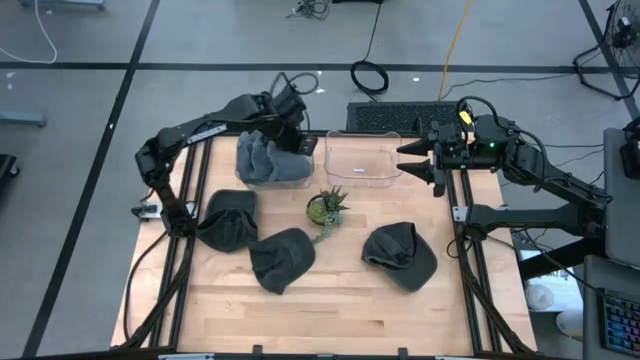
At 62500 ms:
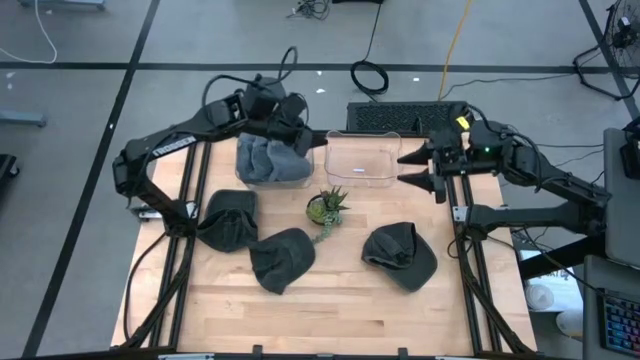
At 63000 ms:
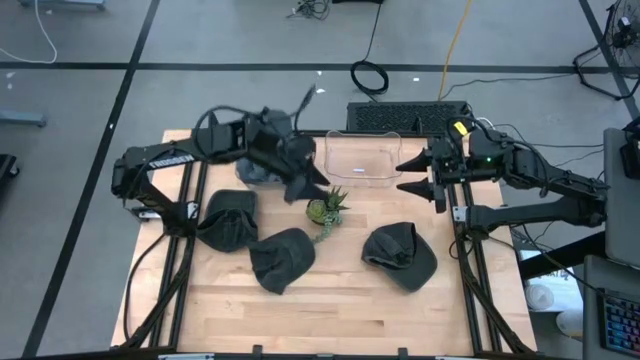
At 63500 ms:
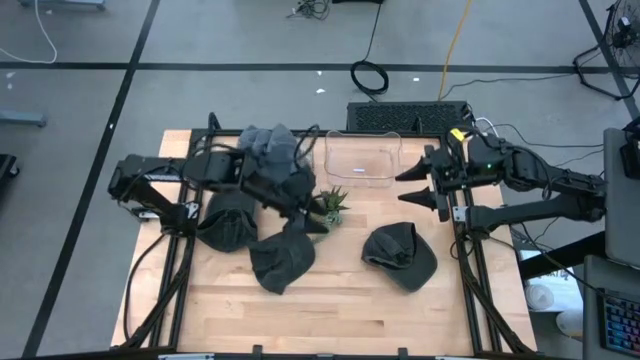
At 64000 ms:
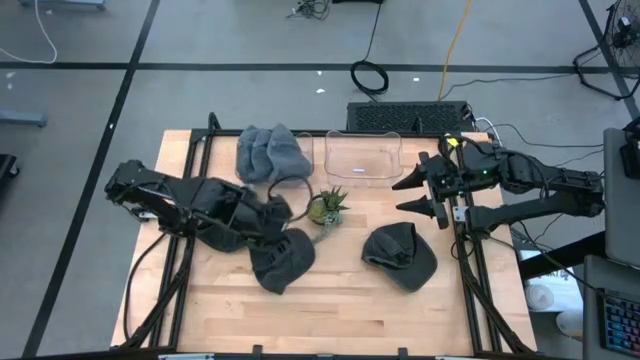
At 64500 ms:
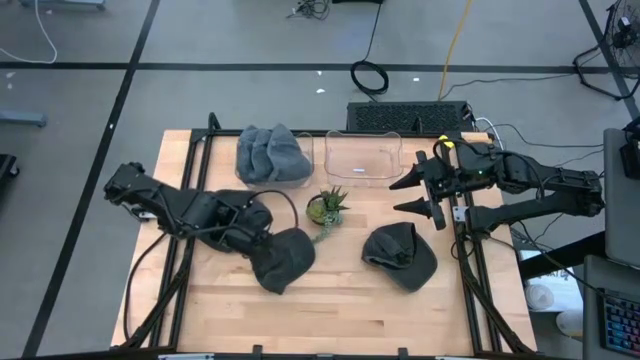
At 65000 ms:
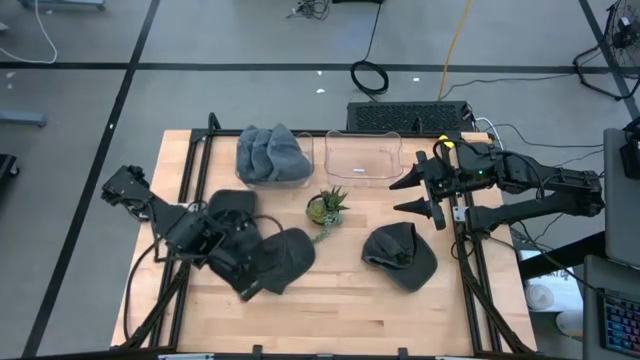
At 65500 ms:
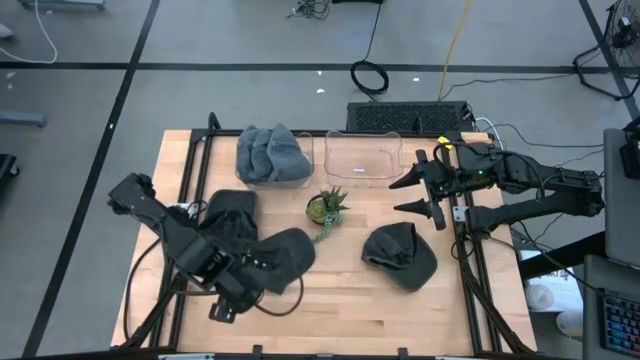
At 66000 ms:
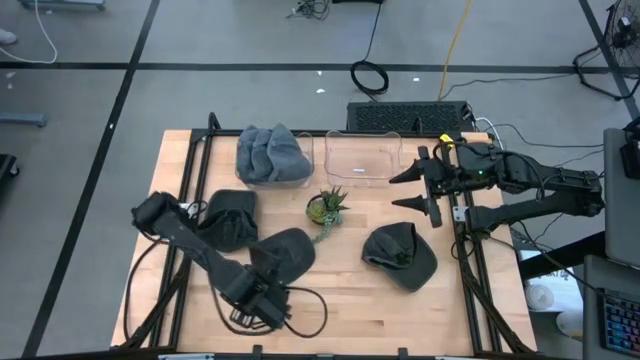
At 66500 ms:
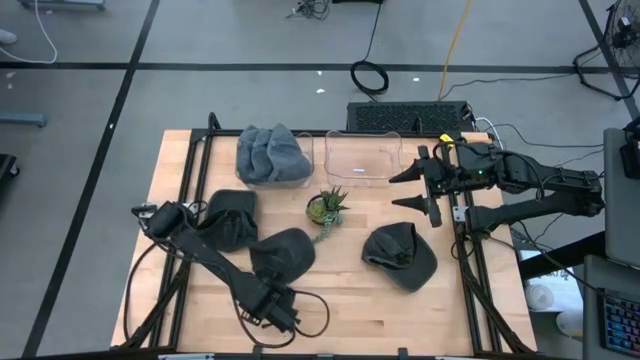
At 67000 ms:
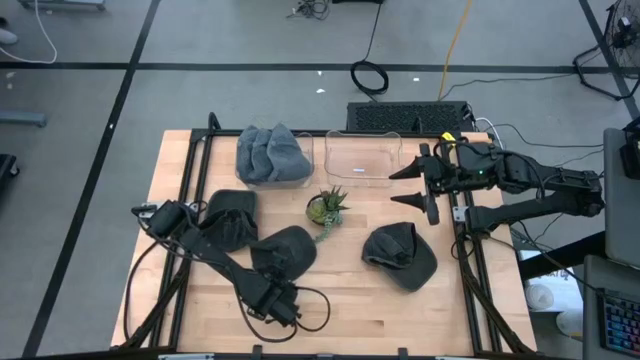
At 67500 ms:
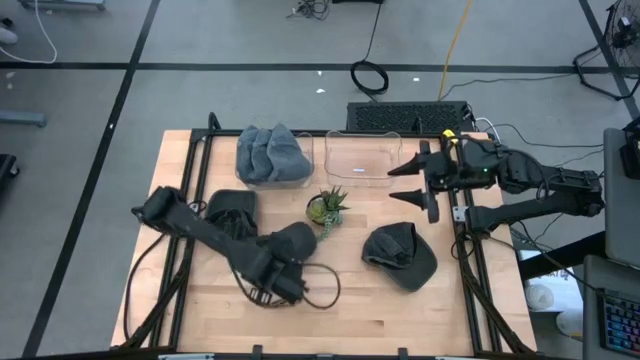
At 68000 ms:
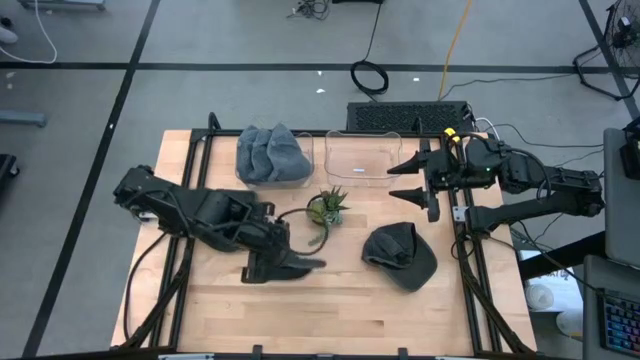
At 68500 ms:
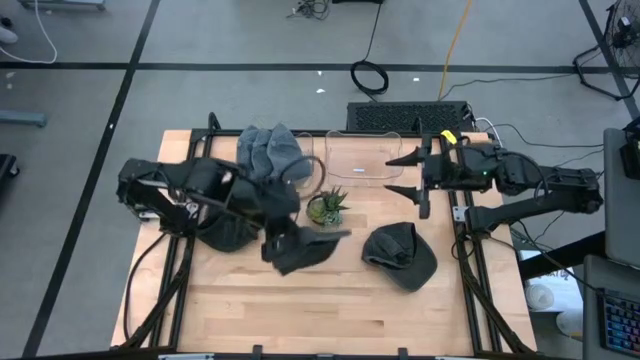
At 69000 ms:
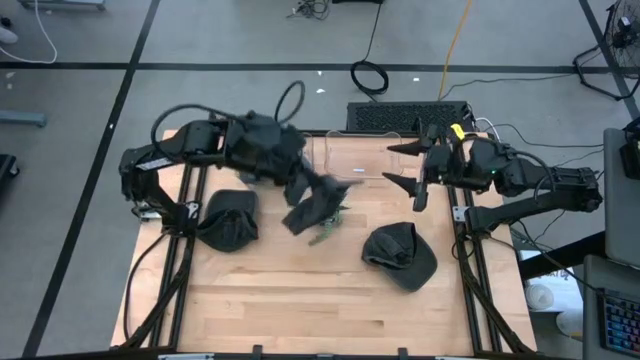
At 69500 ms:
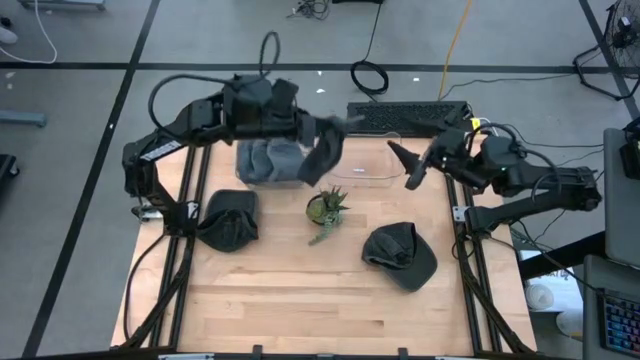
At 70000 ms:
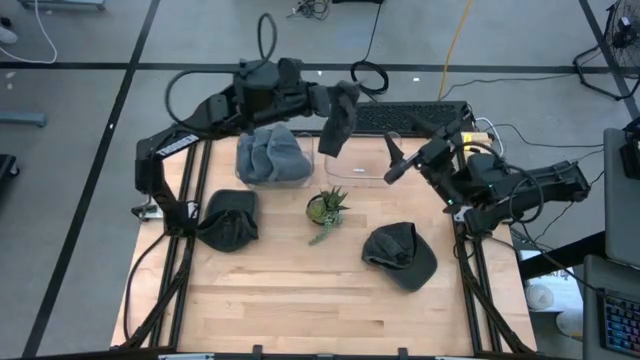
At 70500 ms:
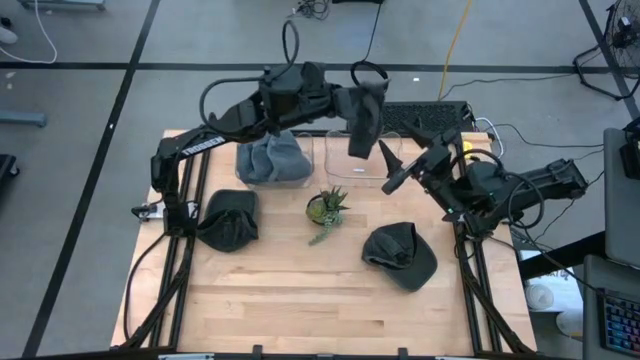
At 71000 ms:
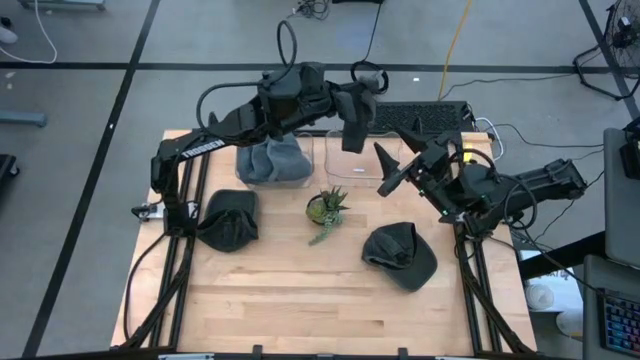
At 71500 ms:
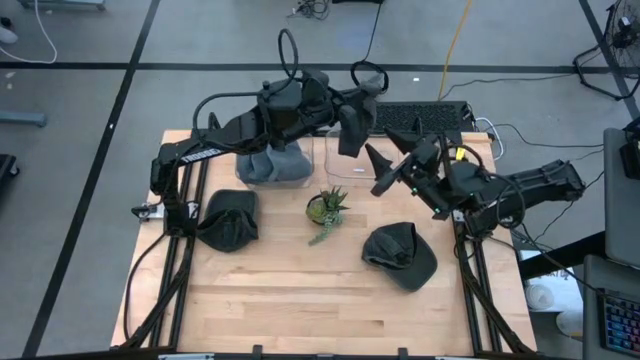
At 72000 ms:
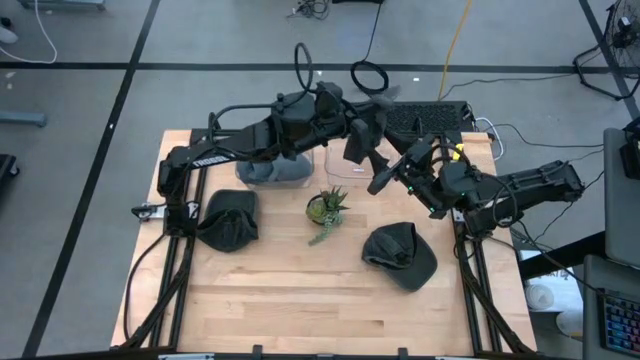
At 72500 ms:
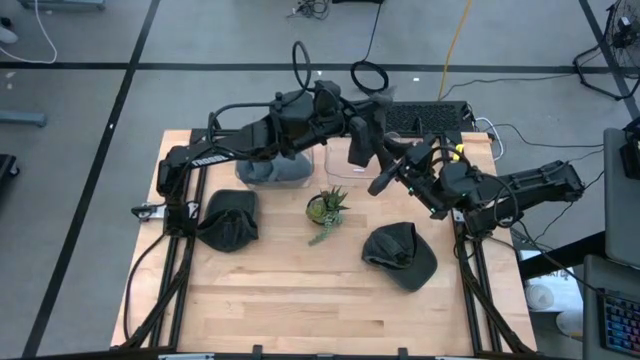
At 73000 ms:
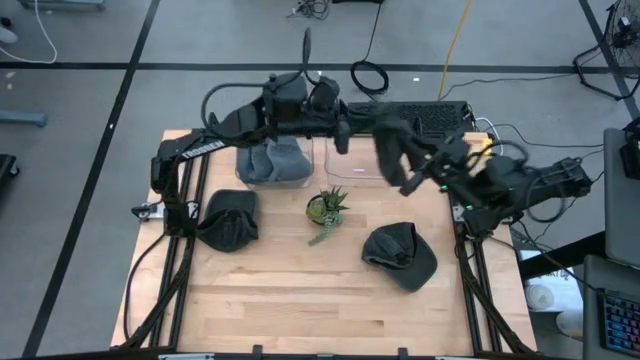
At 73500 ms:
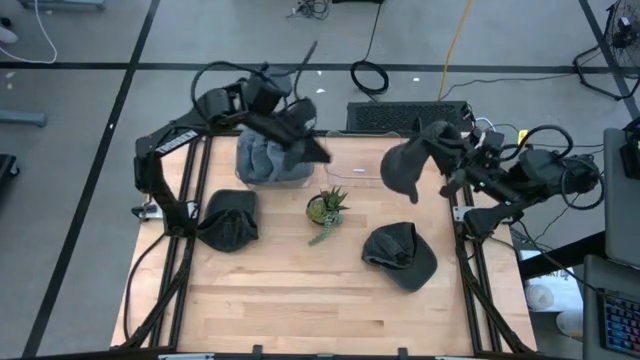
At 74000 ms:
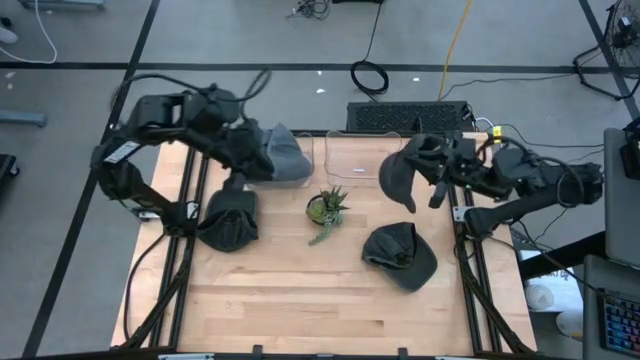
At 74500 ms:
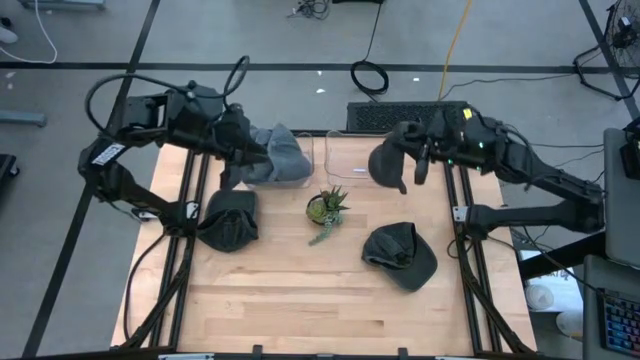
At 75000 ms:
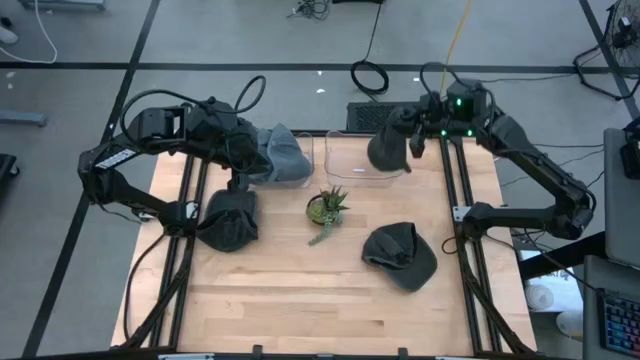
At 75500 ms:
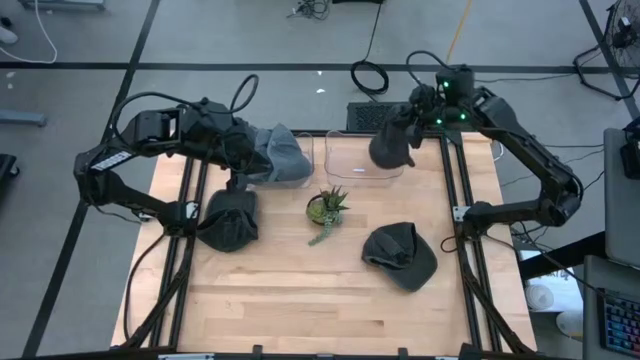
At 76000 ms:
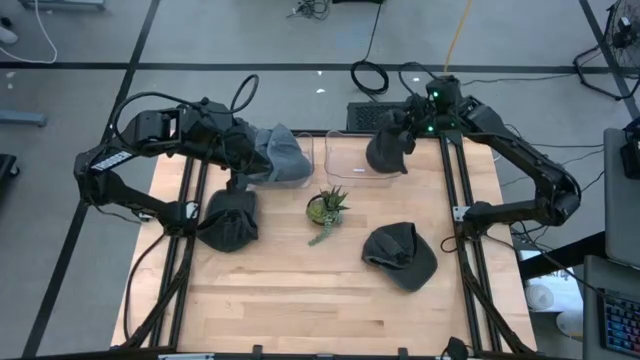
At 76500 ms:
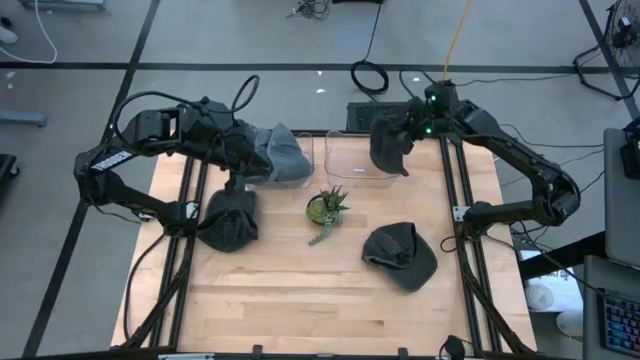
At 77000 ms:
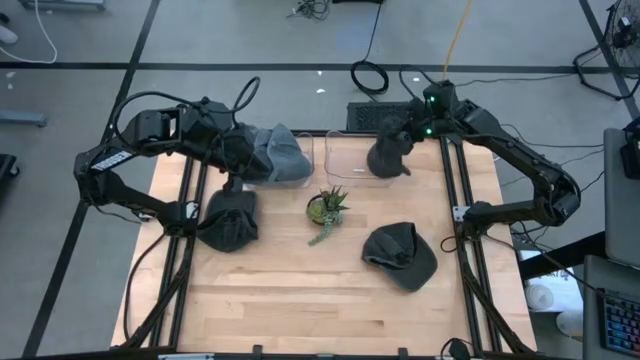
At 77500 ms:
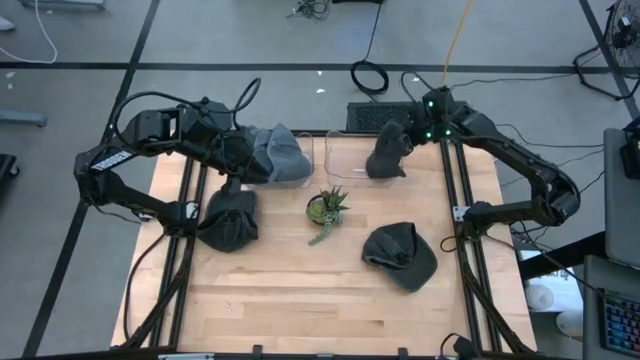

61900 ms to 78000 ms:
Task: Pick & Place hat
Put the middle black cap into the right transparent bin
